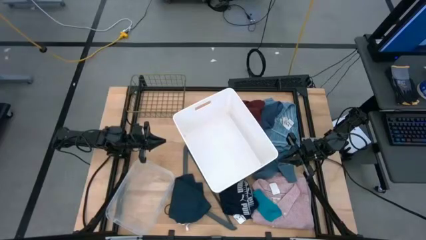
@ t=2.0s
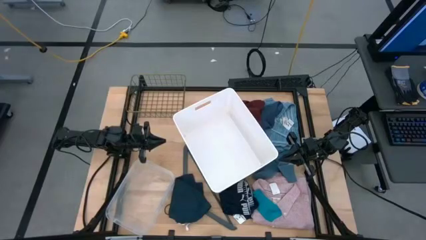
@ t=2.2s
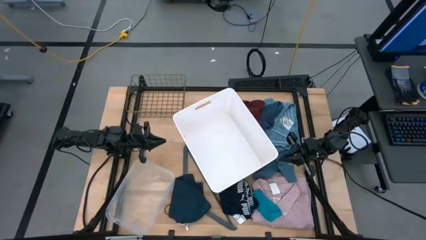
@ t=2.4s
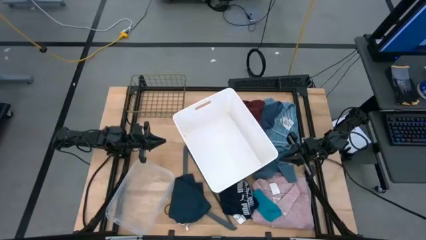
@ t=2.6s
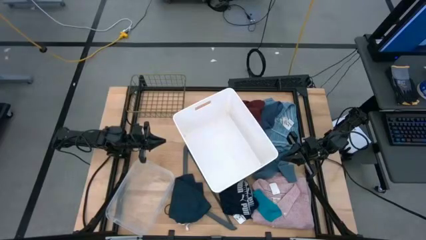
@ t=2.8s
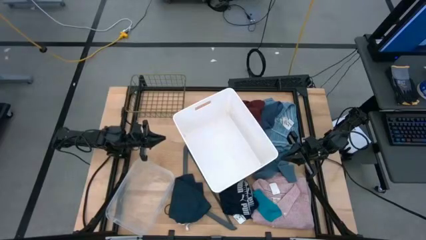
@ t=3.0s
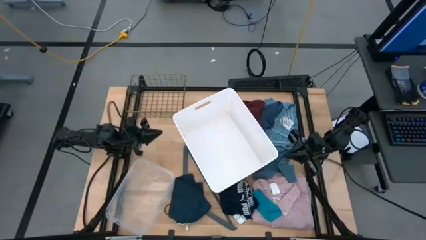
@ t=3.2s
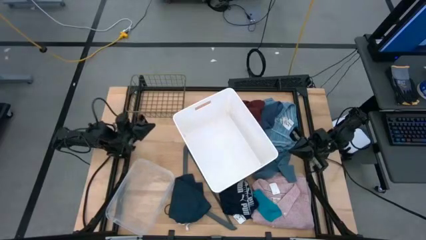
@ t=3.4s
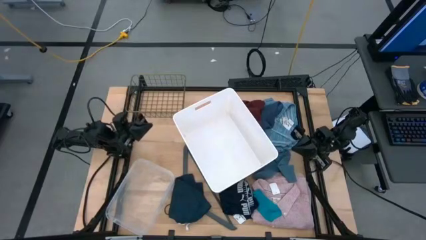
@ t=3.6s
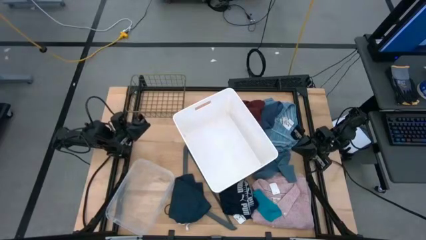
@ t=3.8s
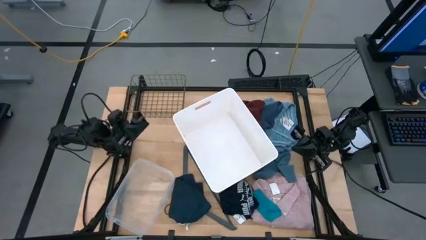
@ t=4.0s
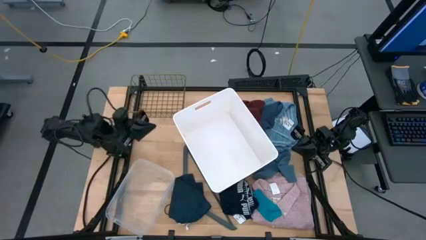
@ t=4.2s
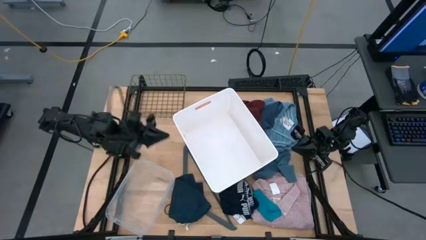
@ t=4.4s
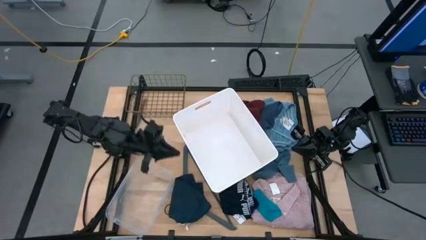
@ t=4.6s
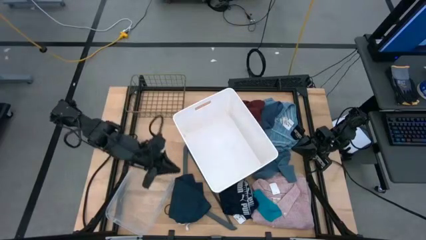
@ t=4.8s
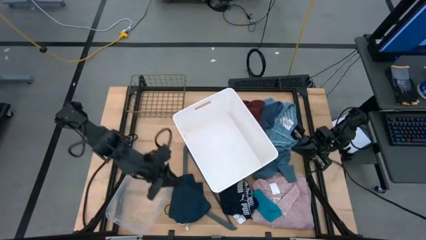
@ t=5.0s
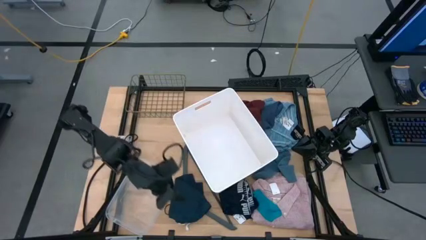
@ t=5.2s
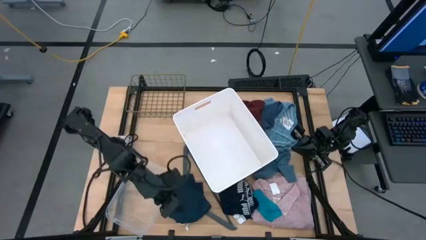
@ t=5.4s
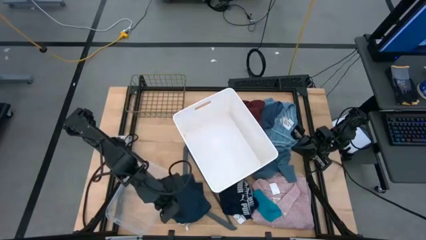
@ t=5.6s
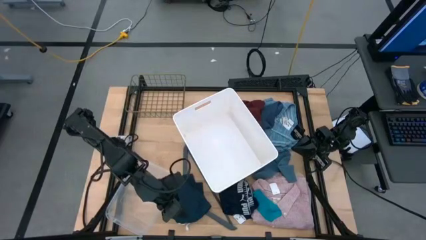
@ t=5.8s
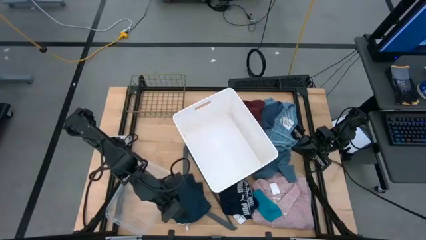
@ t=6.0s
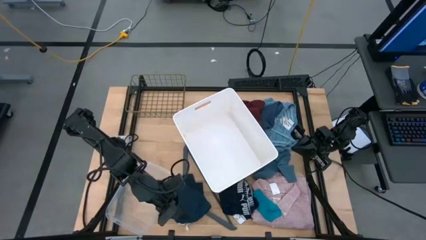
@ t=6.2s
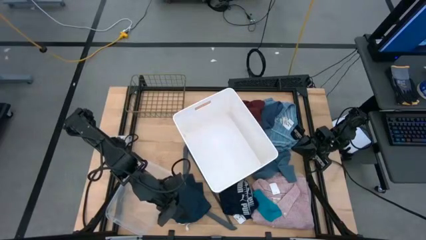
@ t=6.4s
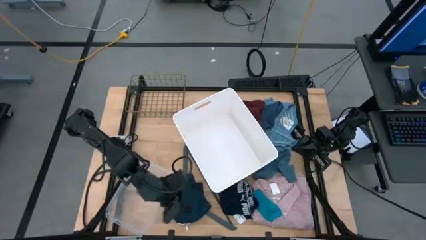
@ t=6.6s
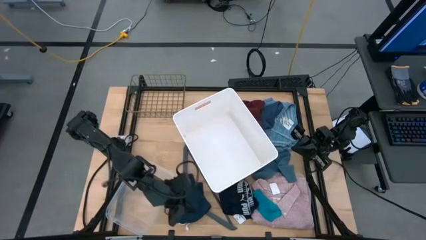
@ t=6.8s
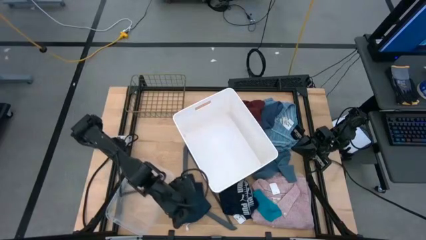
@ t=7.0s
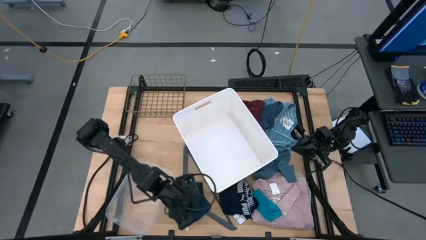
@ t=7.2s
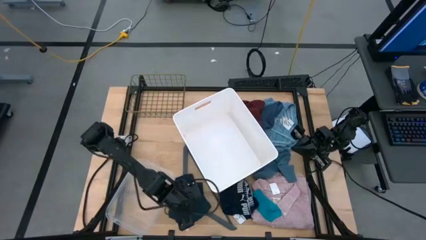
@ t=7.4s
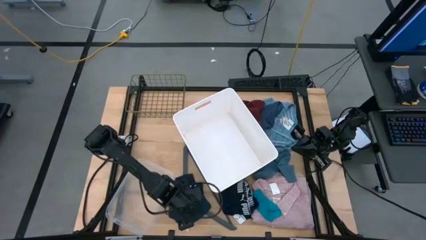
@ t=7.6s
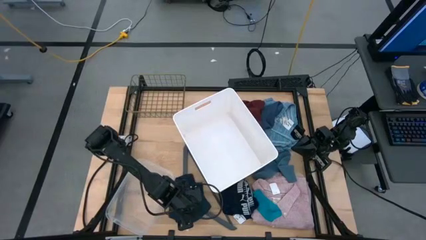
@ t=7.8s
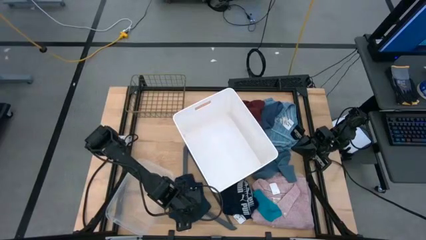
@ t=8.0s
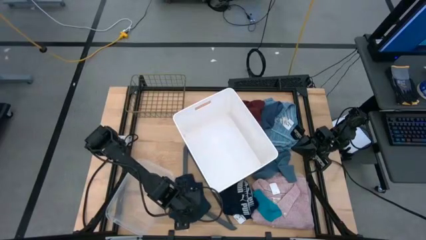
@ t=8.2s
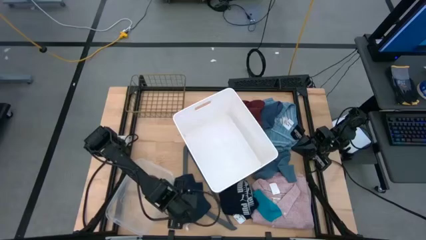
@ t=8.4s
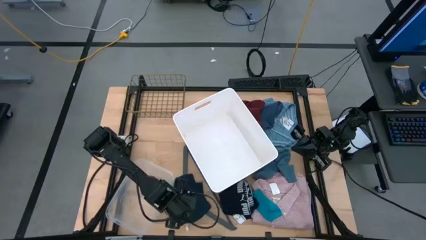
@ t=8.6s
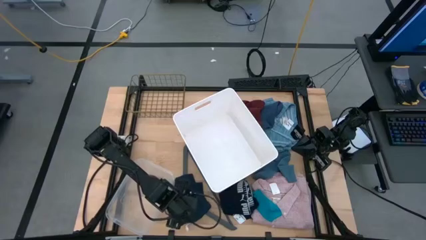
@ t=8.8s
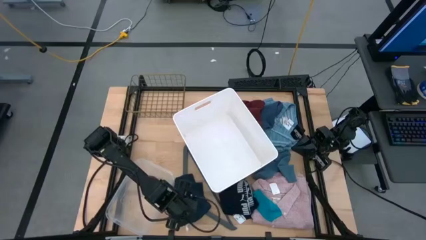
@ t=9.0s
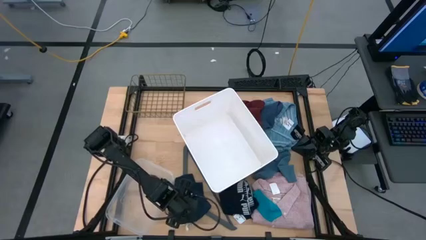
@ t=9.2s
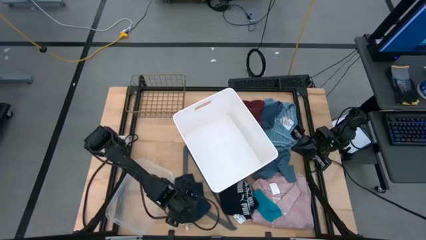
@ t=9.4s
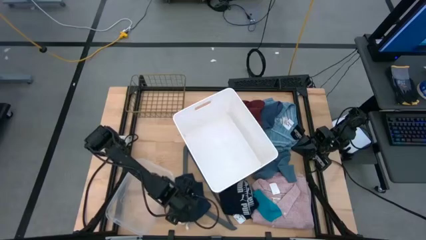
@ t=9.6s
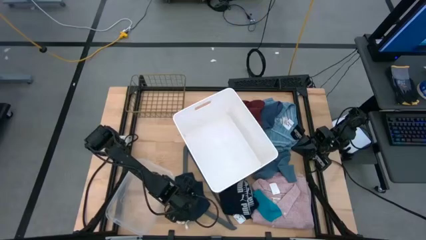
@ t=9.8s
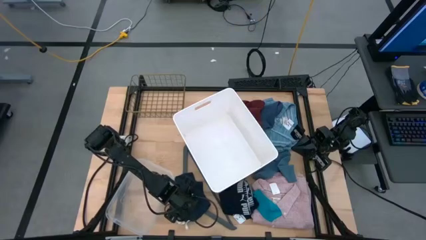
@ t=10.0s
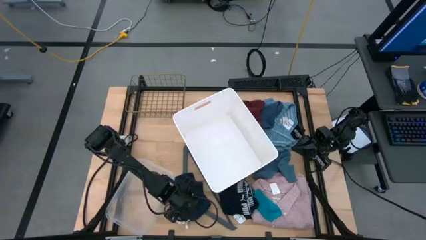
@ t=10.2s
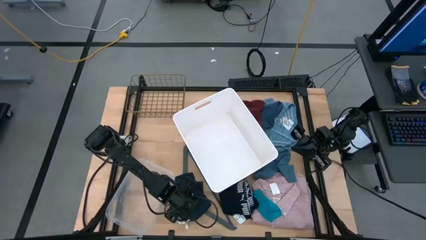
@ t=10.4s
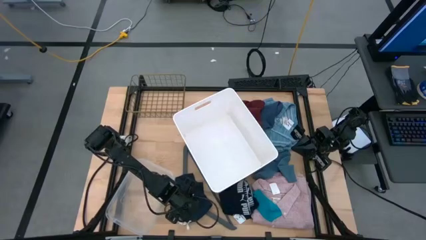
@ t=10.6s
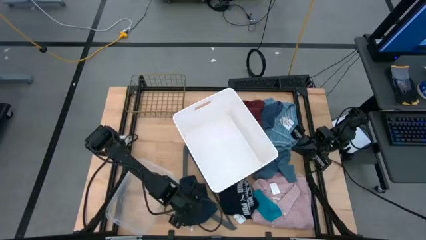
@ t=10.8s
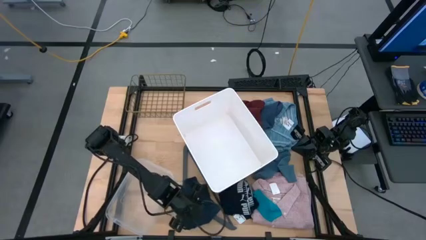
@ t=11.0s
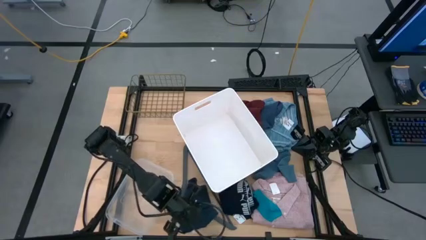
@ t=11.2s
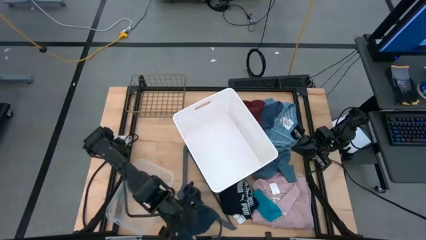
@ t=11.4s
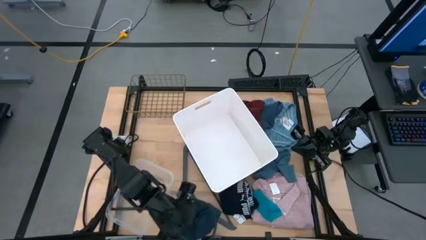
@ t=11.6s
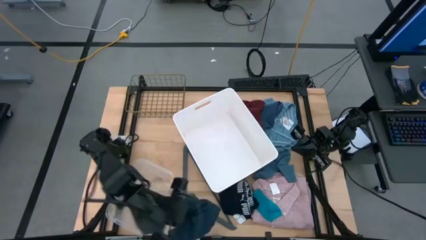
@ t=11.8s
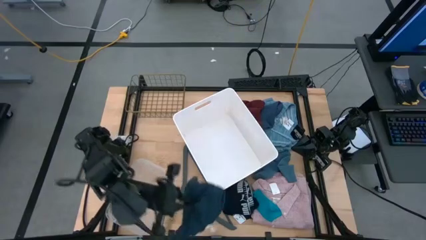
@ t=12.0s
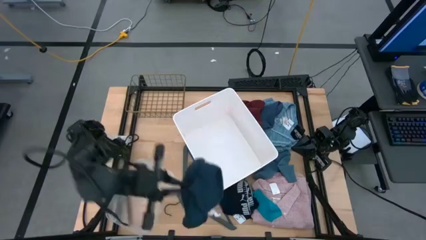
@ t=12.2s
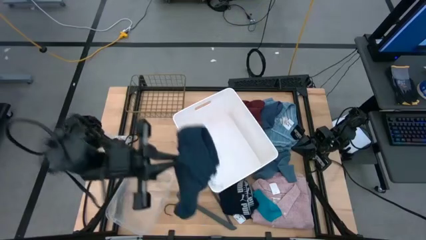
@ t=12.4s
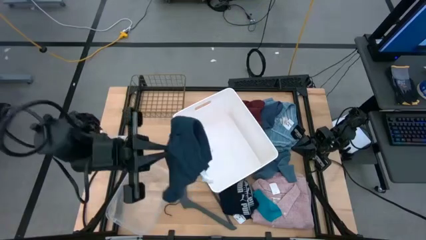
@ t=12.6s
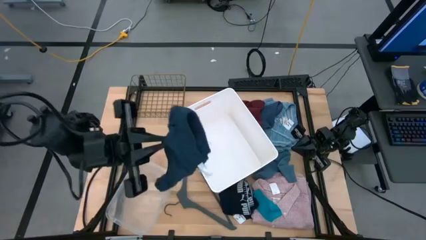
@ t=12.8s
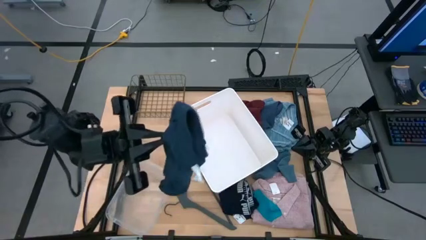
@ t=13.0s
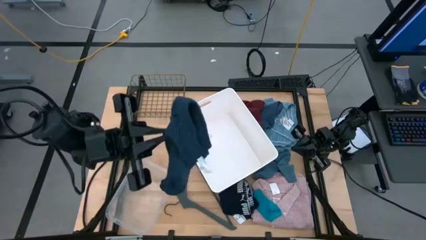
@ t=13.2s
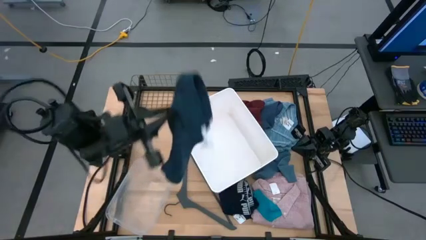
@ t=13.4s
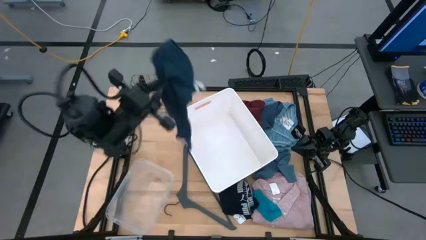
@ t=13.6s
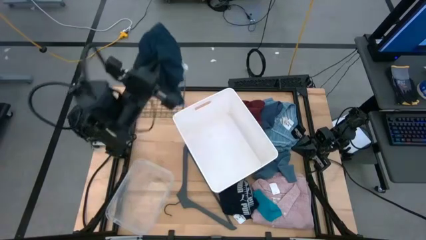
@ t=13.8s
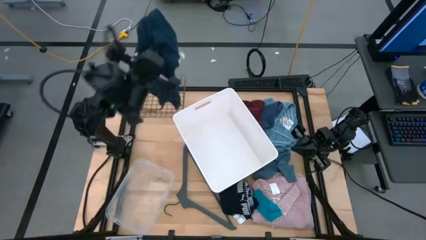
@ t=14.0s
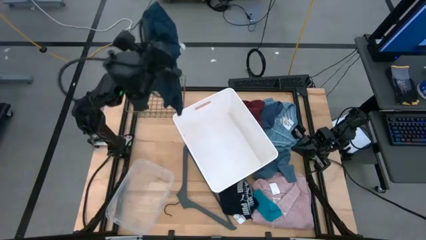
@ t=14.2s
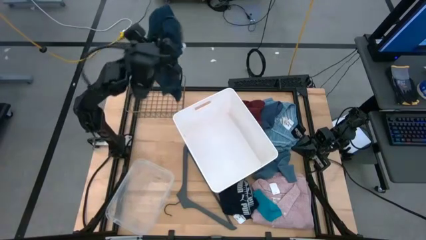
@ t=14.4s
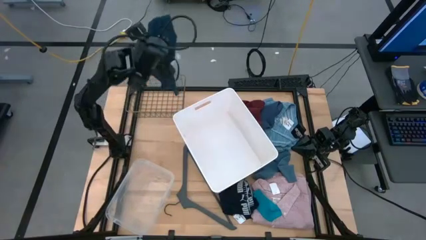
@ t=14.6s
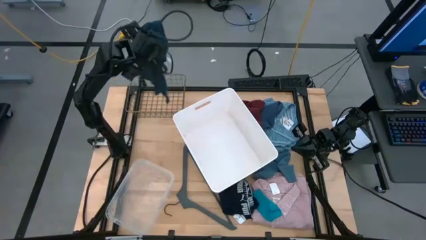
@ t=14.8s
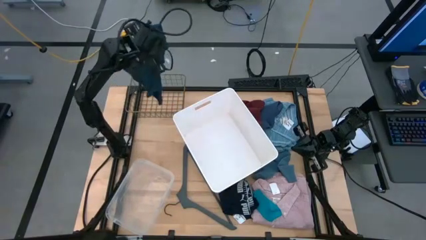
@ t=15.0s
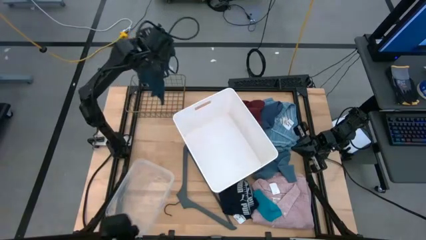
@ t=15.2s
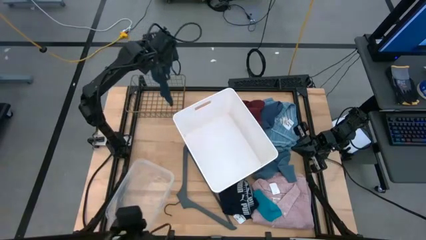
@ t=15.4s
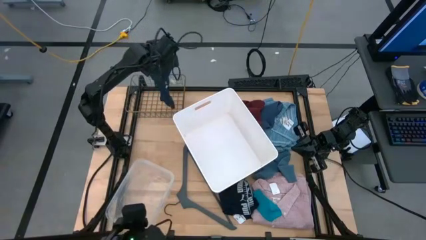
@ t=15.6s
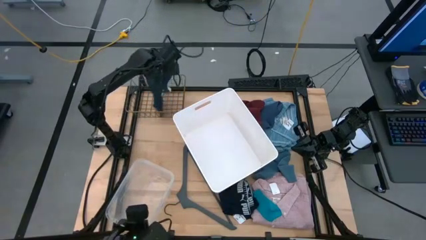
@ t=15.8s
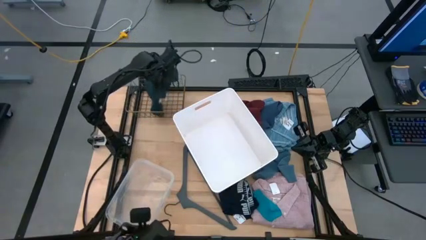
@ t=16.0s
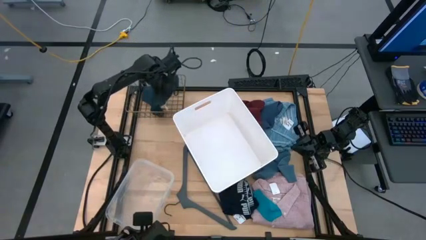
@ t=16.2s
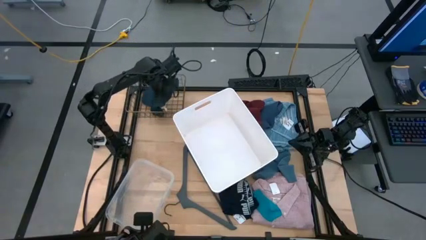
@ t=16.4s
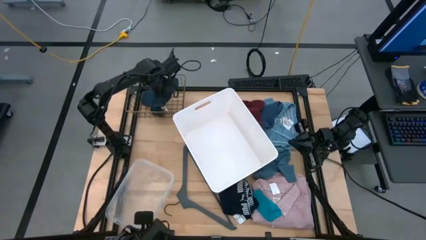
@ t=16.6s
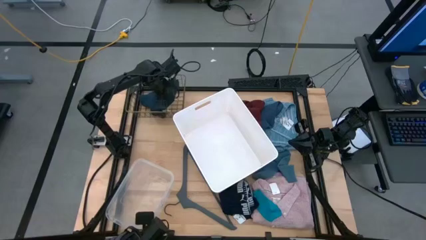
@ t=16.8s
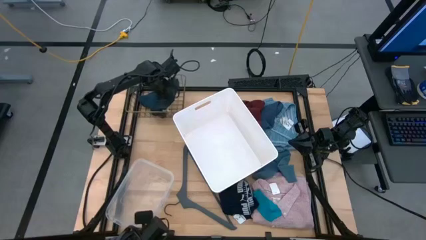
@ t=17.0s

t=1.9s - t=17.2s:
Task: Pick & Place Cloths
Put the blue boxers into the wire basket
